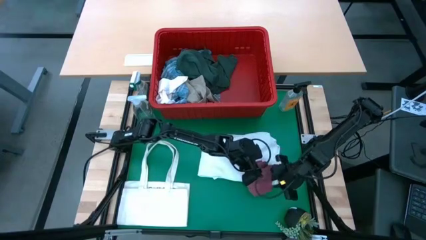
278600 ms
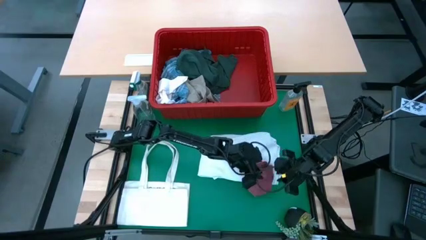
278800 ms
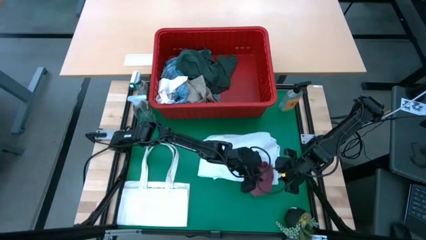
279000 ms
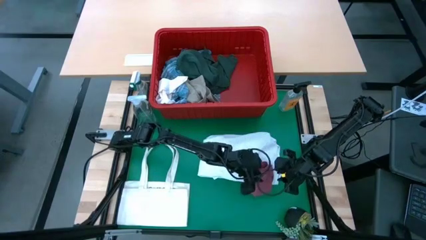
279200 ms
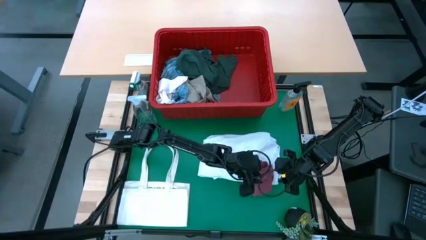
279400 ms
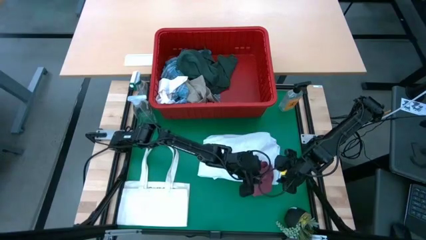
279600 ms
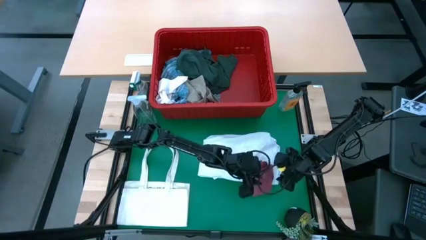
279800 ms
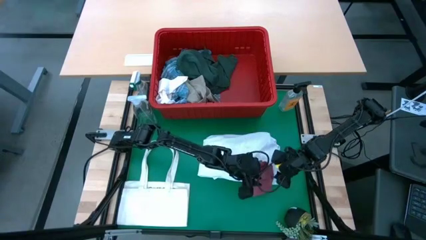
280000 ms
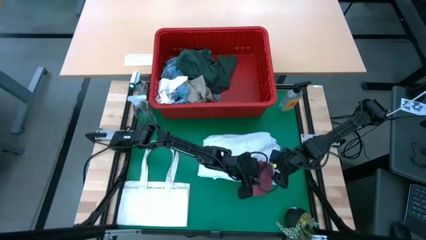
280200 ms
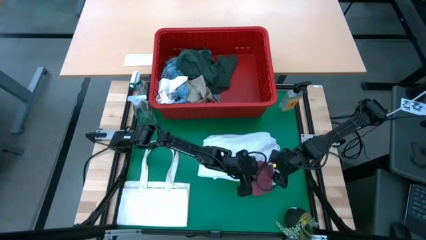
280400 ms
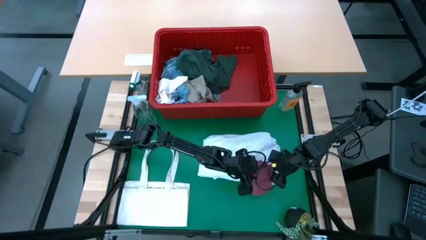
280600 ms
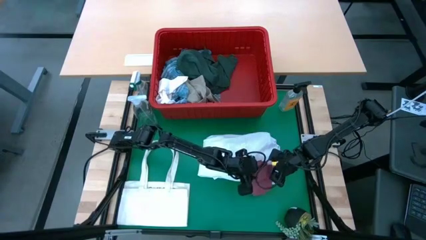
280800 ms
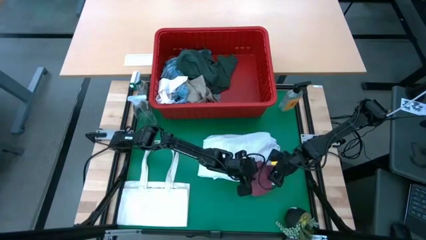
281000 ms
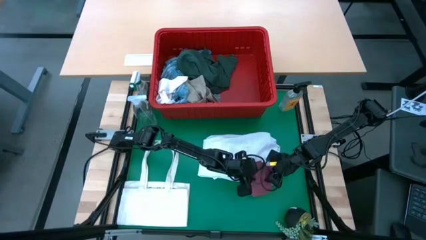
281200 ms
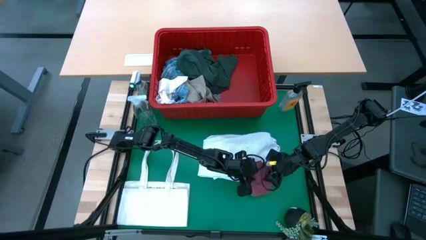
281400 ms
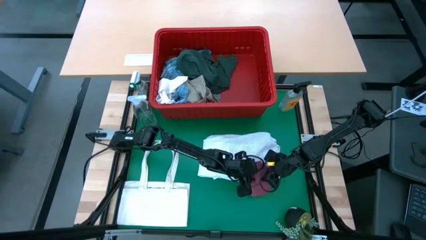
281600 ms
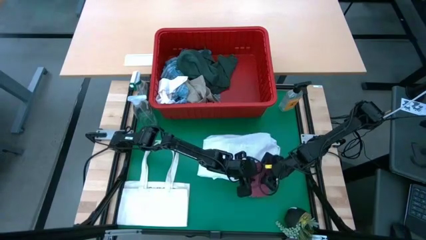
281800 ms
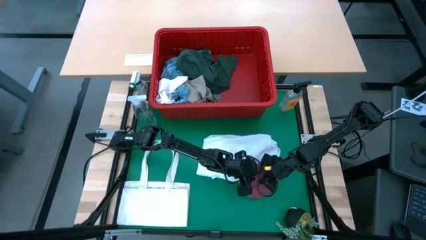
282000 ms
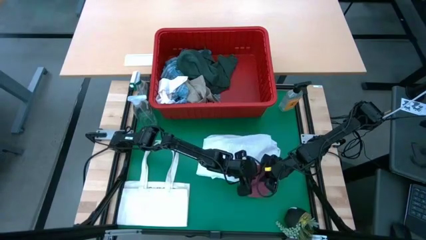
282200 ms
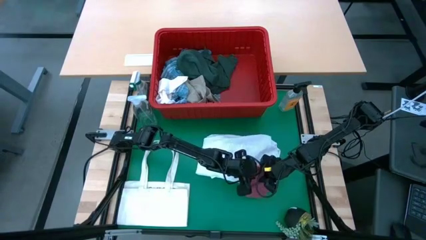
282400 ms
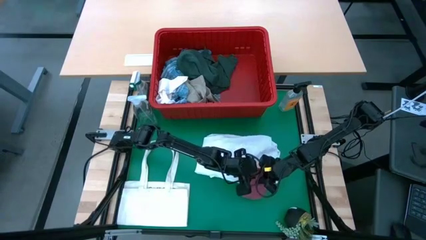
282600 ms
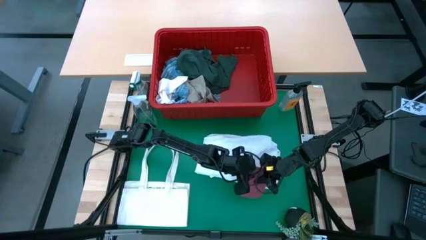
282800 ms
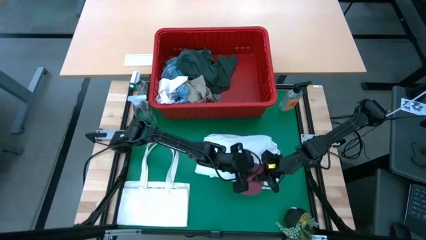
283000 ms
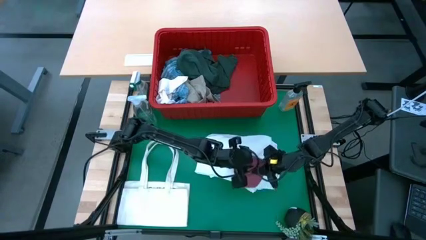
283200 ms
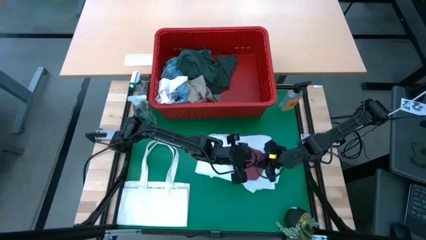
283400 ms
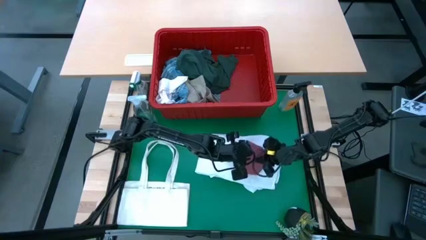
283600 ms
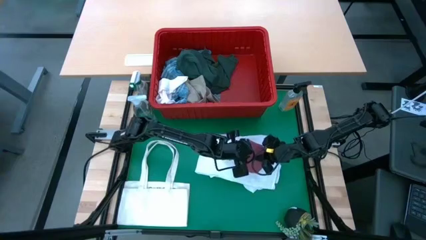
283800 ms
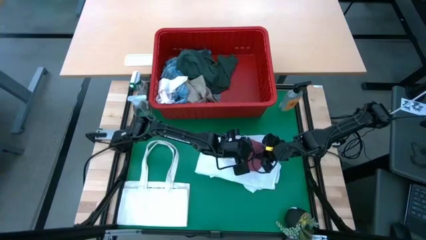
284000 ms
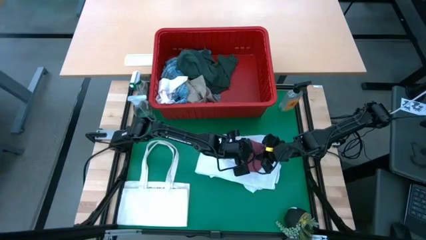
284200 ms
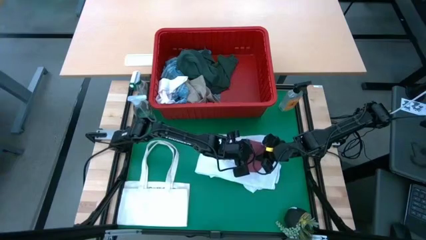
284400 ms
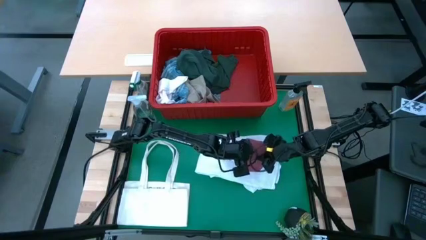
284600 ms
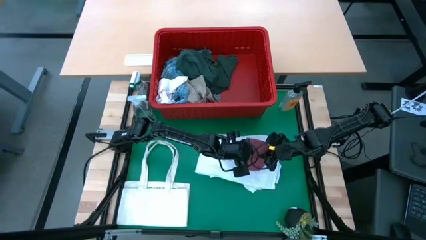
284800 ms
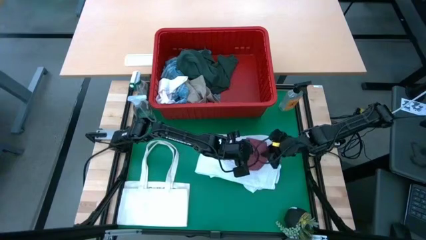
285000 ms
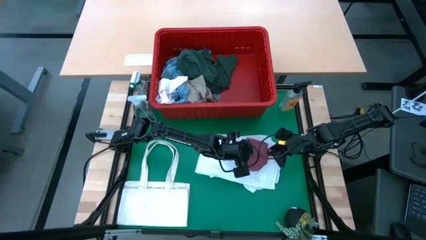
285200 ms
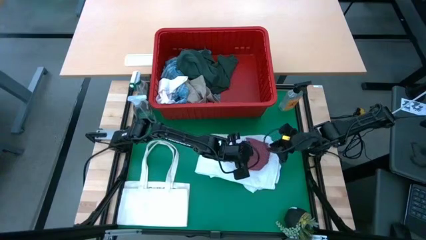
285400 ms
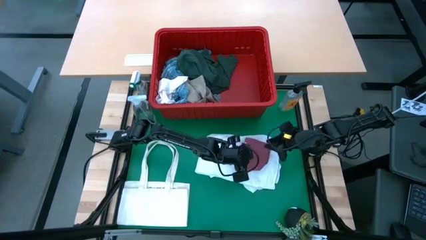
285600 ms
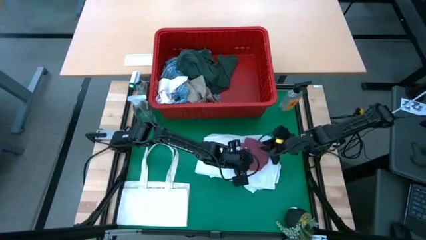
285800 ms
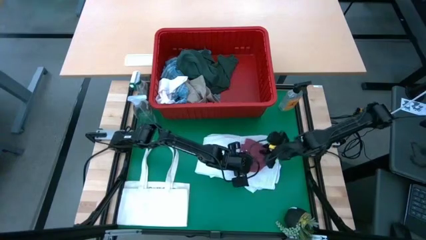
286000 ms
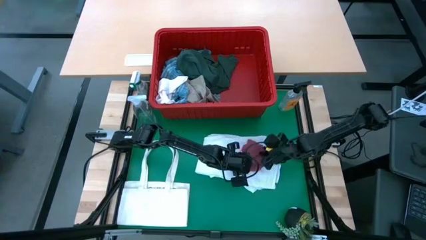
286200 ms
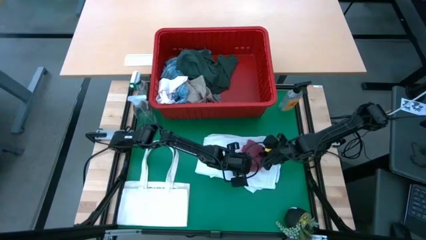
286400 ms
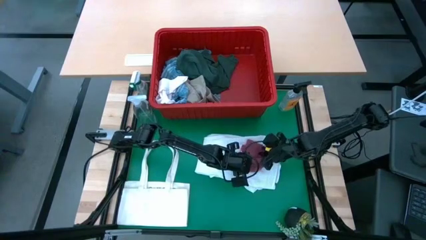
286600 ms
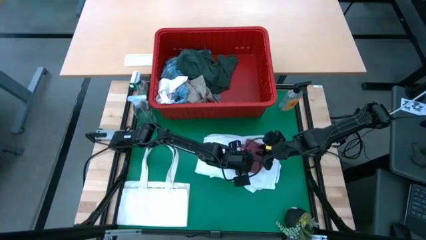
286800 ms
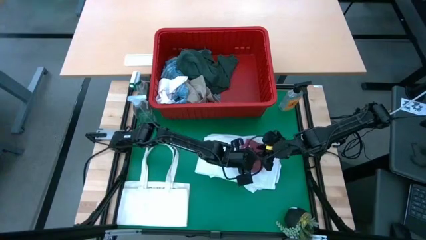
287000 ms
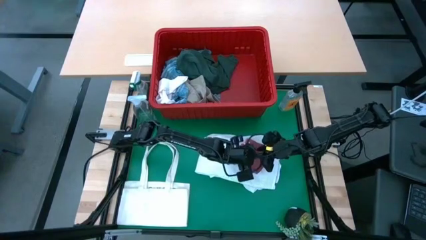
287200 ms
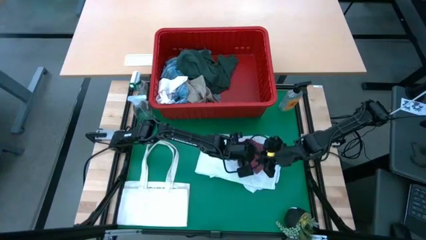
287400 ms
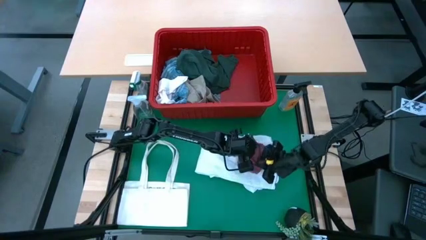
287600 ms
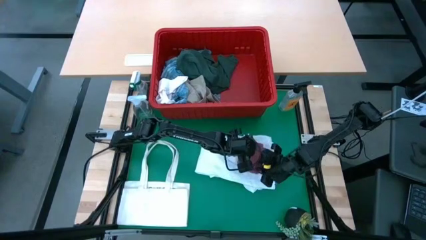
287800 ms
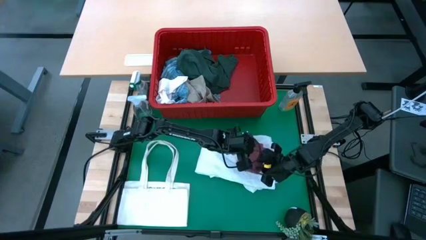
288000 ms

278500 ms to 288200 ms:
Task: Fold Laundry from Bin
Stack the folded pink underwear on top of the folded white polo shirt
